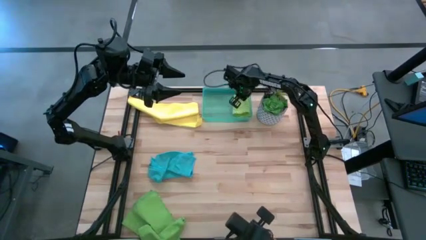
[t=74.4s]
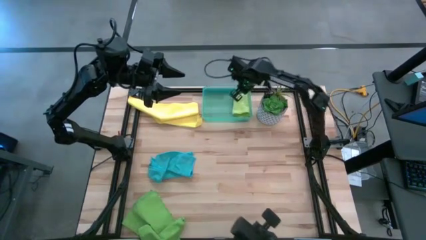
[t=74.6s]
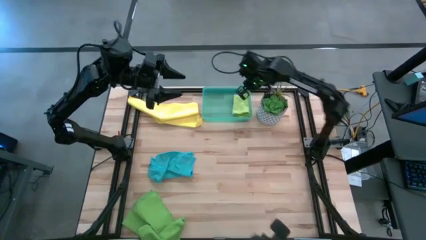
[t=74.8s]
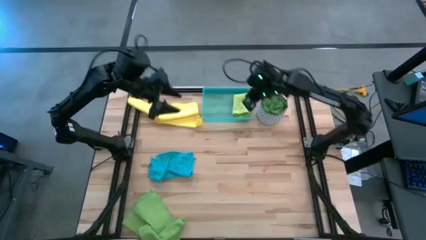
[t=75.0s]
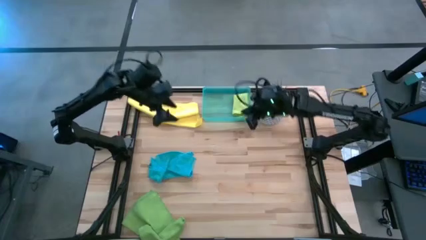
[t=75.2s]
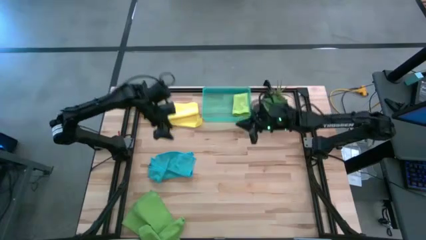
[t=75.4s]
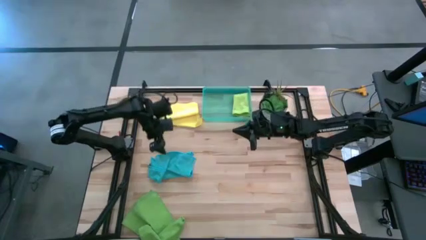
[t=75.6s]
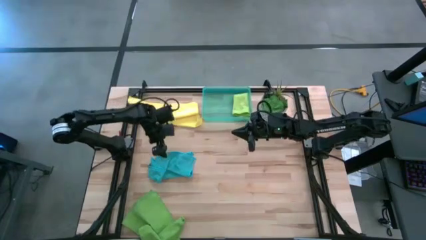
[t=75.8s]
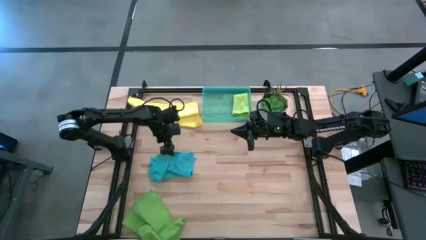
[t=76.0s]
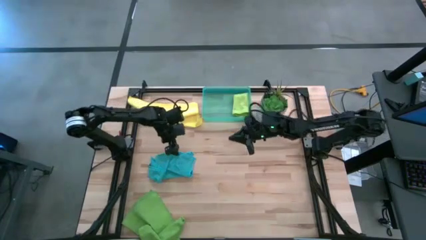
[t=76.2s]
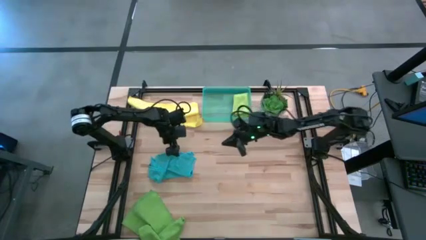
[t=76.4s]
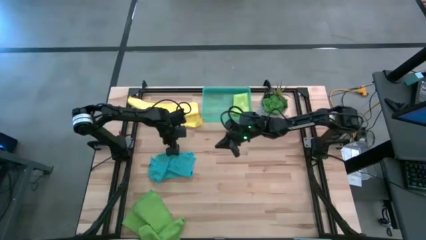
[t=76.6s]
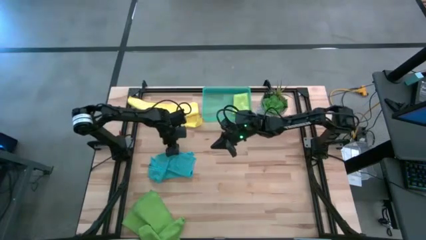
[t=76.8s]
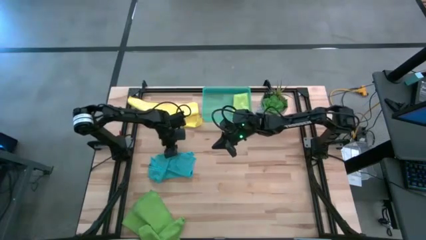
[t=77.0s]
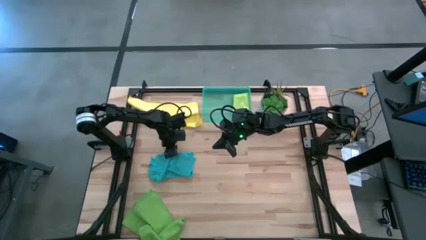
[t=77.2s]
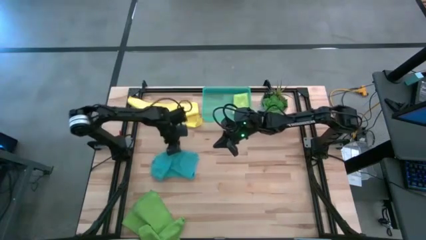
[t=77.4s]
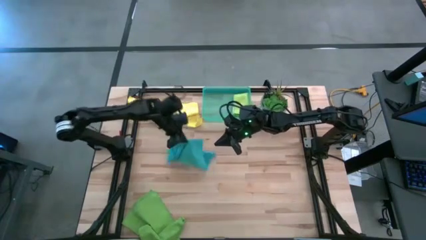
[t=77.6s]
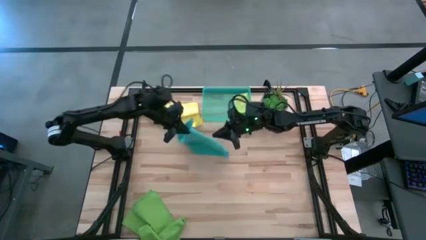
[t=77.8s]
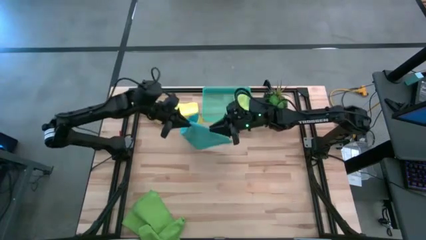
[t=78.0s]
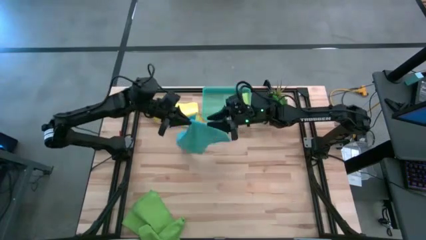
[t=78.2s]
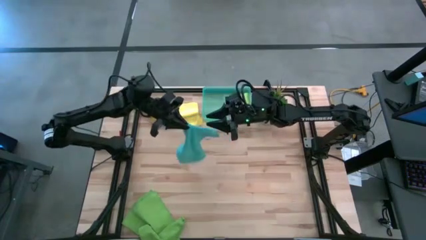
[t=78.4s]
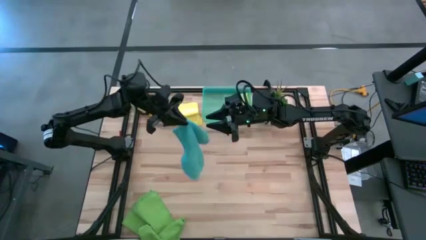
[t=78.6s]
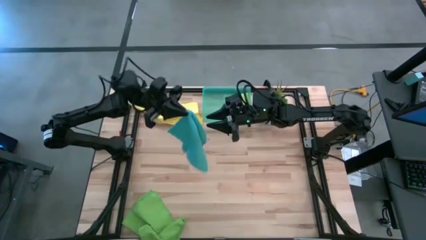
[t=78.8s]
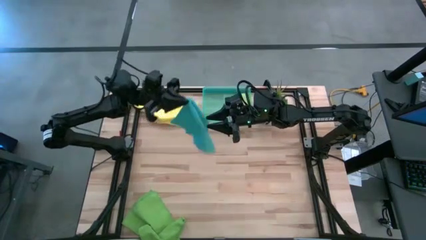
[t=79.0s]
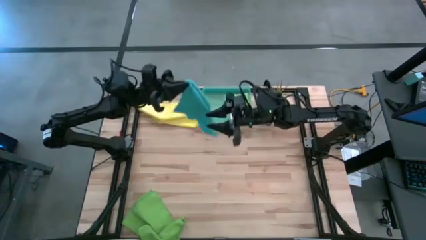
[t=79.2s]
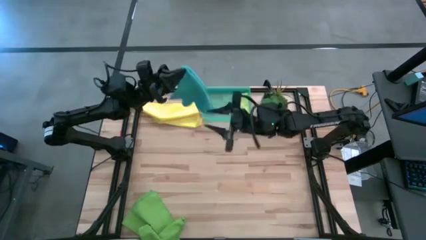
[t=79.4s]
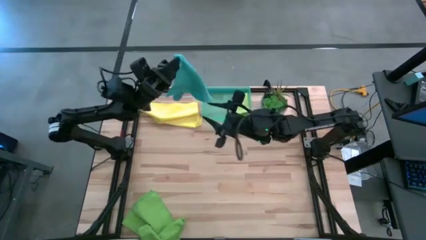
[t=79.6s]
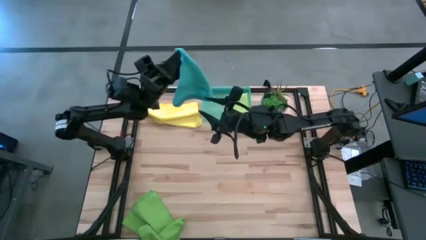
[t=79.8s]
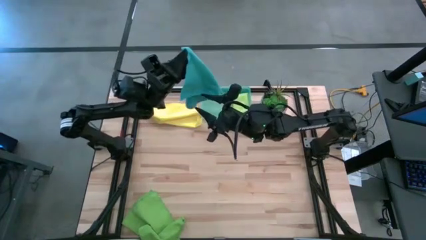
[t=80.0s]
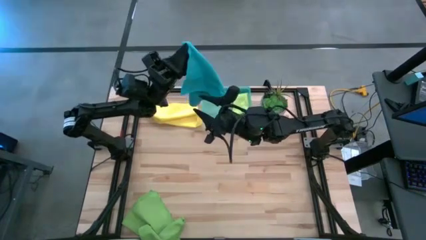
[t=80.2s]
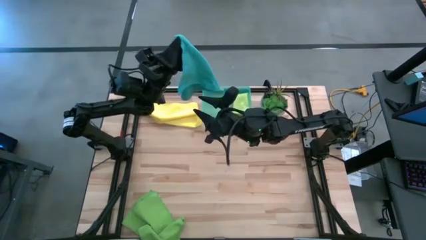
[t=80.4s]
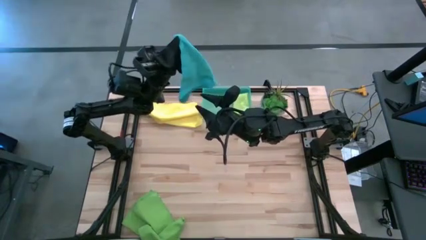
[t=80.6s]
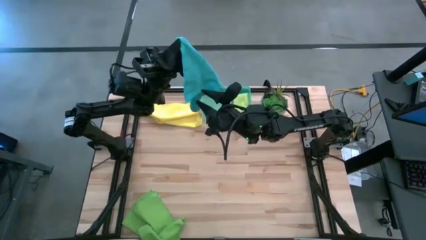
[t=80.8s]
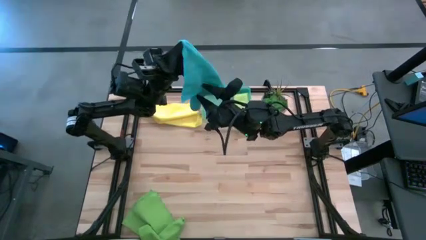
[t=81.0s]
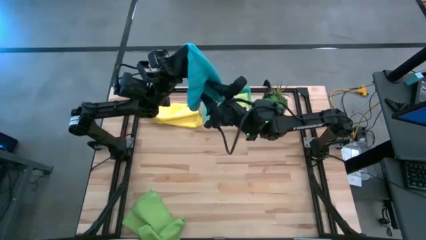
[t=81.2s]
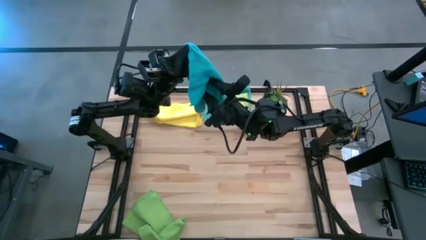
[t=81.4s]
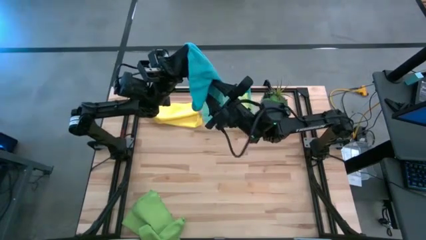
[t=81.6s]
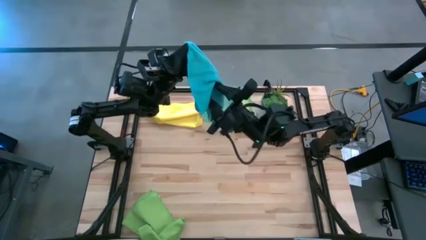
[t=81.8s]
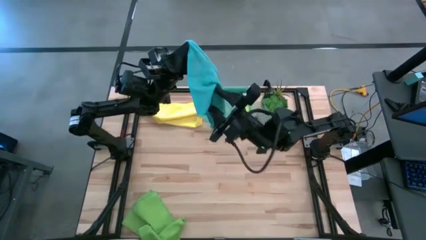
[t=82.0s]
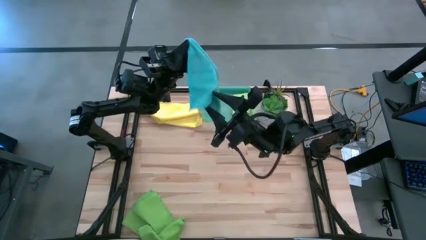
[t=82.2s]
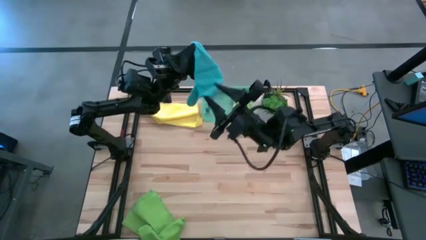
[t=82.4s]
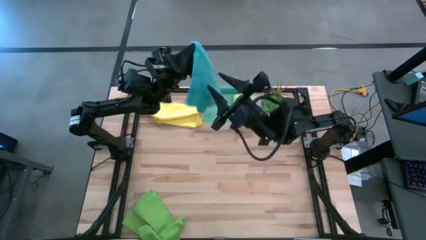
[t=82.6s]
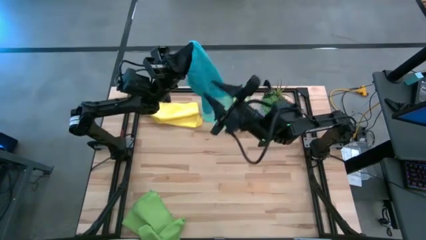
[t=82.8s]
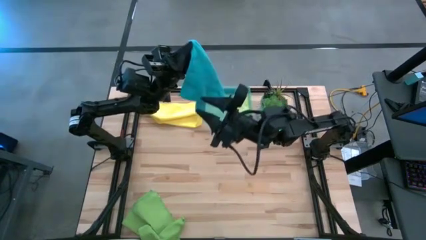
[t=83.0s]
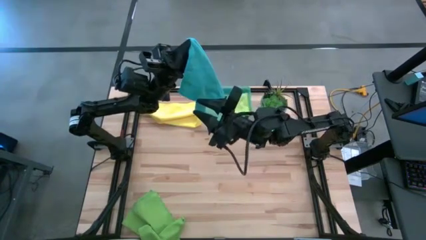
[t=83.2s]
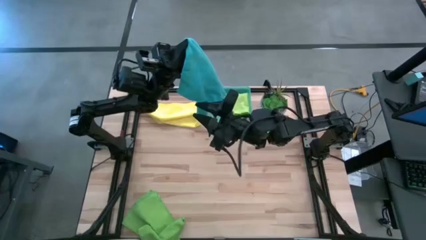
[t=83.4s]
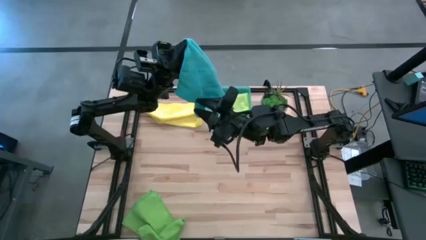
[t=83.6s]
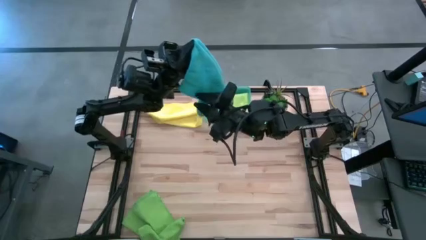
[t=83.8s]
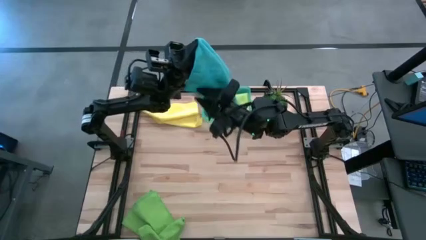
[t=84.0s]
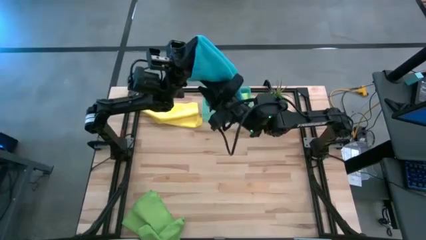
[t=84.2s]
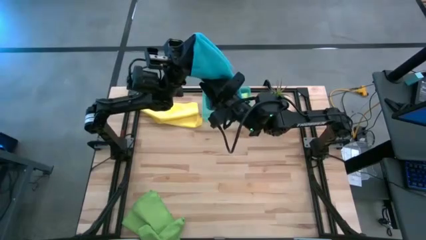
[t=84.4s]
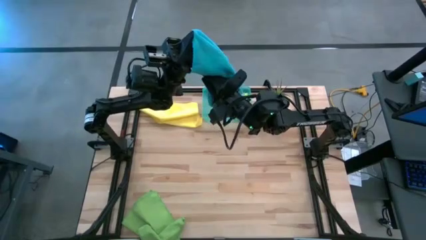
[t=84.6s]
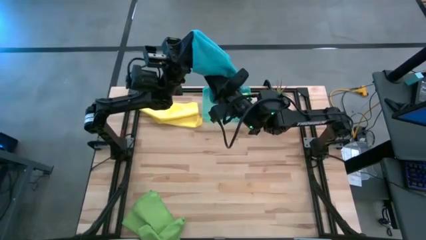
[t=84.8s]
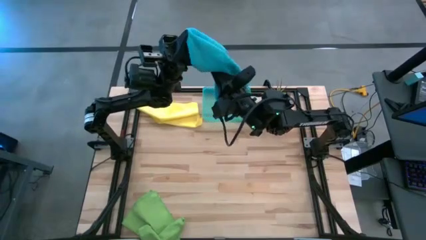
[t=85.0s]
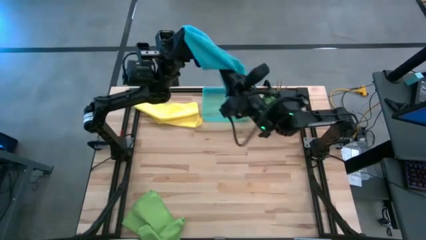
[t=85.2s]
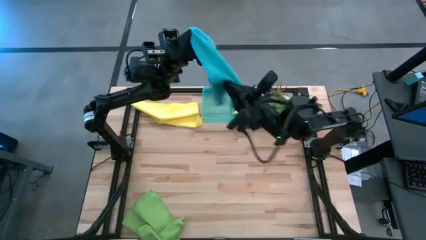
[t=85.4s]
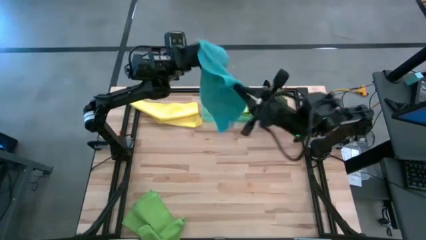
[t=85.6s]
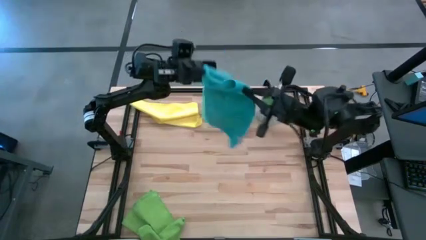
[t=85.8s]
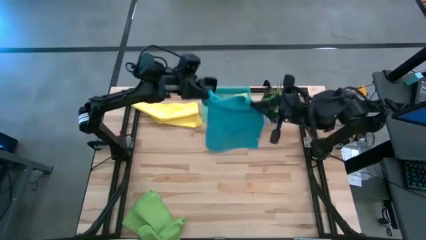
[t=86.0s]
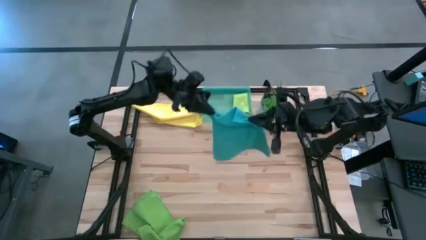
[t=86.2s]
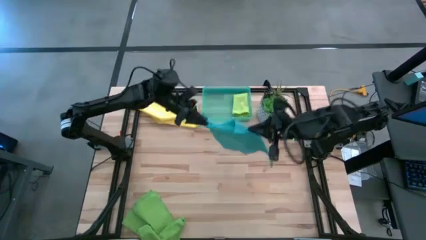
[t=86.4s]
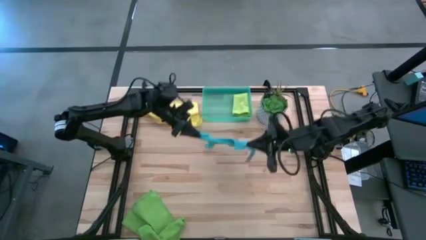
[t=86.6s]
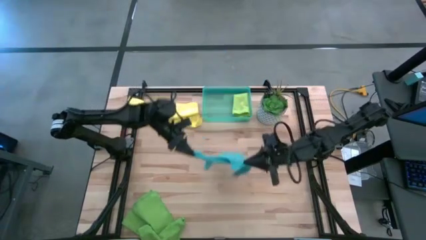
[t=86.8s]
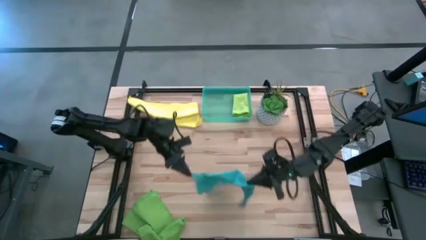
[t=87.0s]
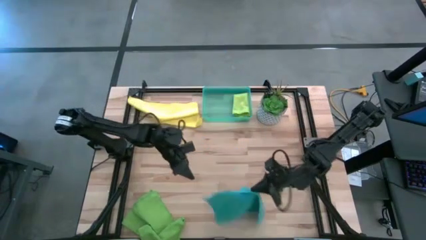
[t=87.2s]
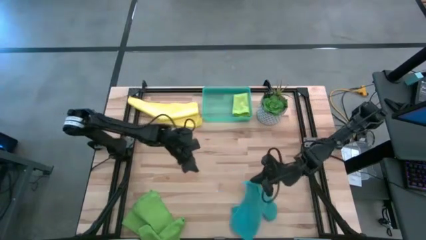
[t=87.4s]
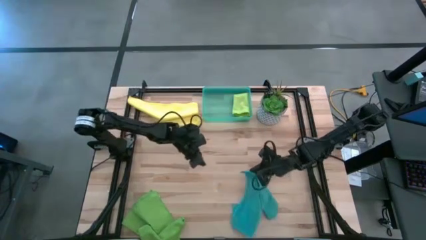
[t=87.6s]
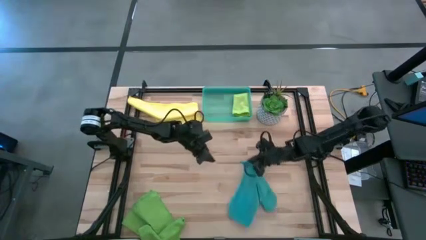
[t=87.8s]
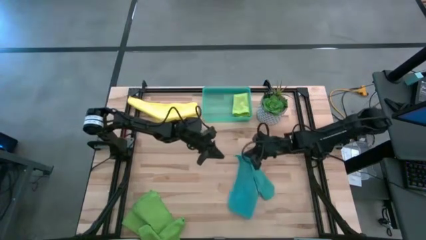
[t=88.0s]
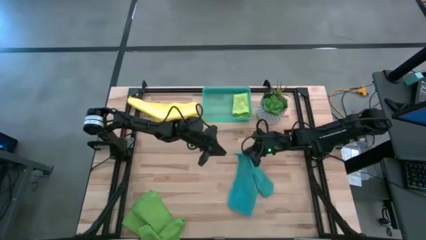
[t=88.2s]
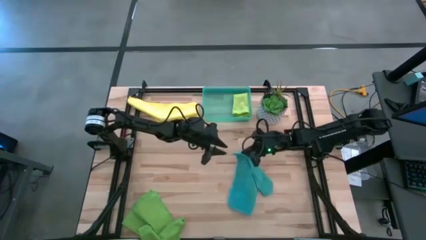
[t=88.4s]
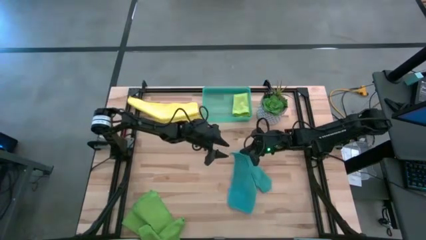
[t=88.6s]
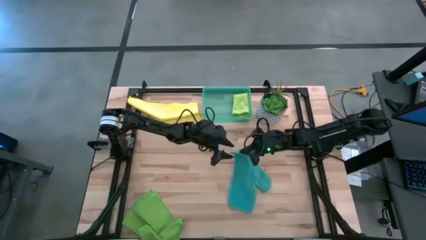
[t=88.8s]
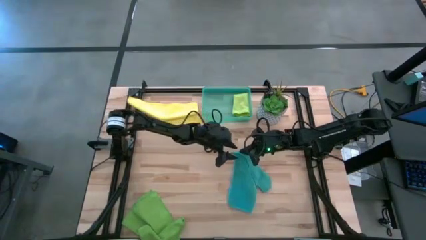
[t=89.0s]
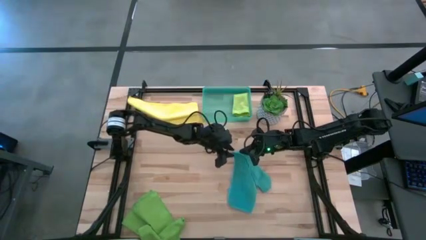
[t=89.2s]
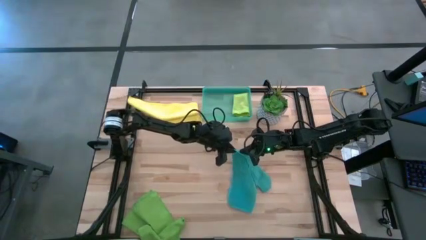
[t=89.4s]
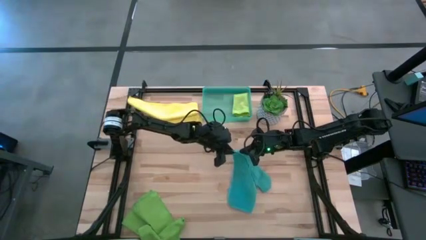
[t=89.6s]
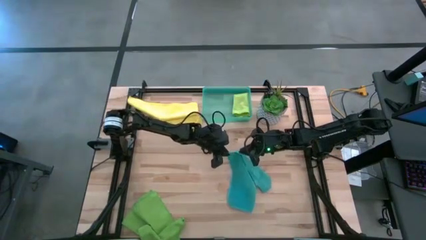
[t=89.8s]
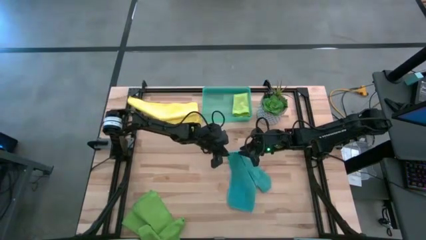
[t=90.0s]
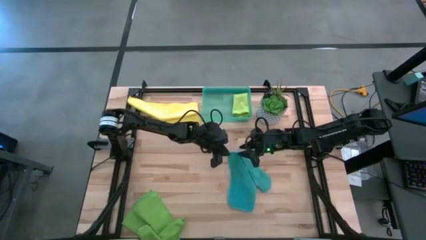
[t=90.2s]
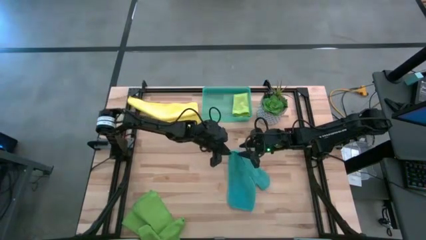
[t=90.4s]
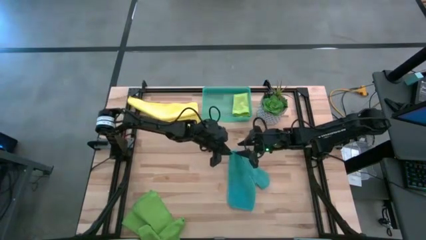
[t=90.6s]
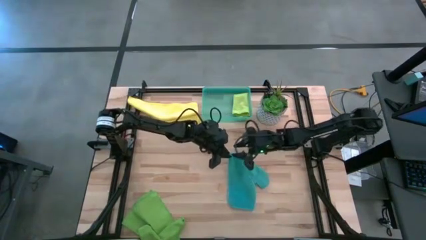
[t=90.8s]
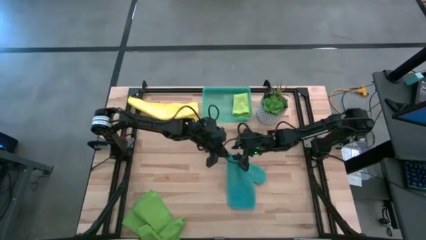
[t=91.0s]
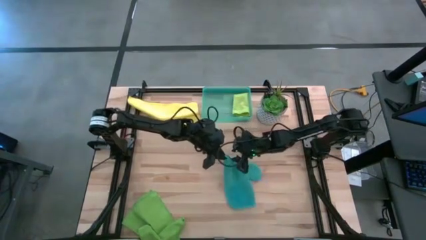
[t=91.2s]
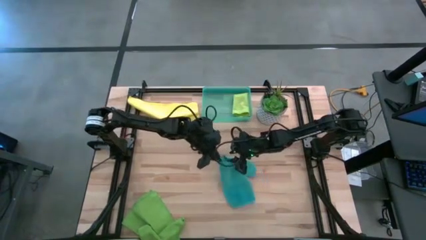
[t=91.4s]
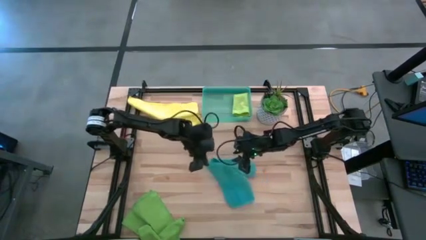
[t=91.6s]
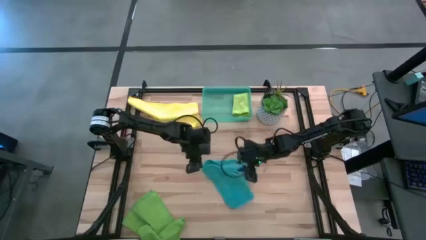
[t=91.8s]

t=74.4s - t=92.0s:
Task: Fold microfiber towels
Fold the blue microfiber cloth
